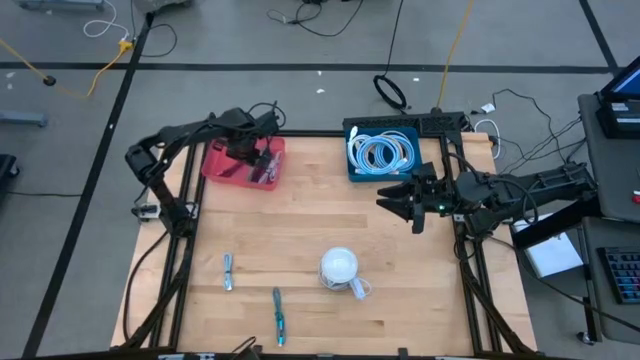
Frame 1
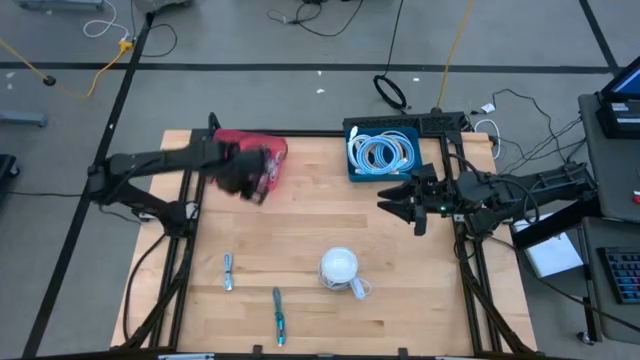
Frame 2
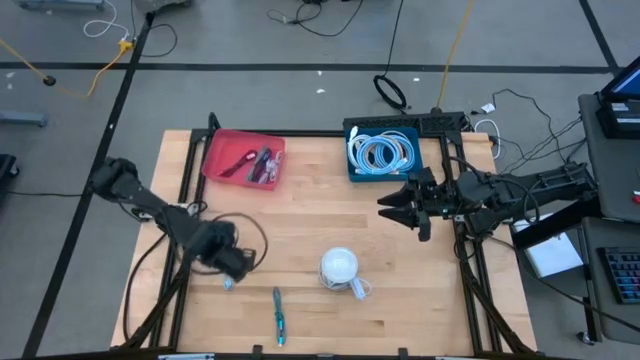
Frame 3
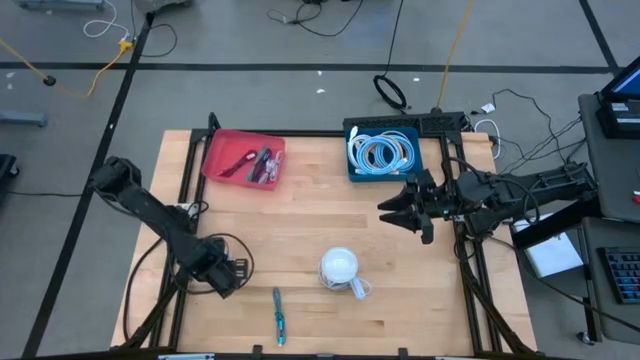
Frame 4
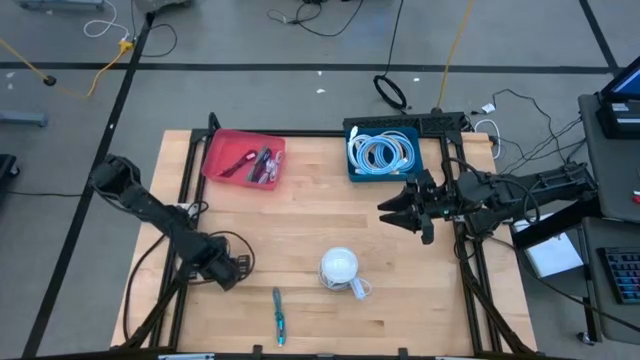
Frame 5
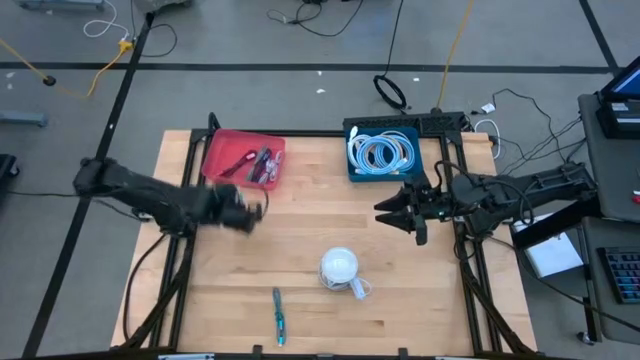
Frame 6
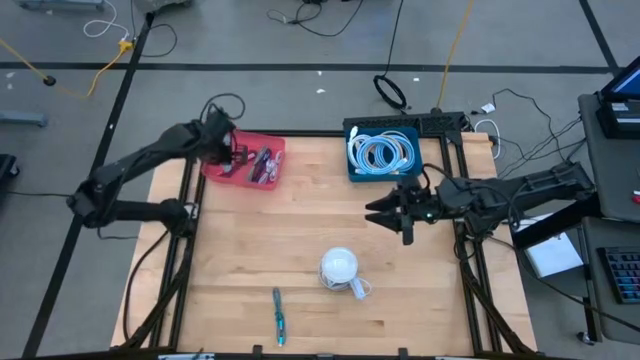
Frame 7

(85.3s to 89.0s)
Task: Pick & Place USB Port
Put the light blue USB cable into the pink bin

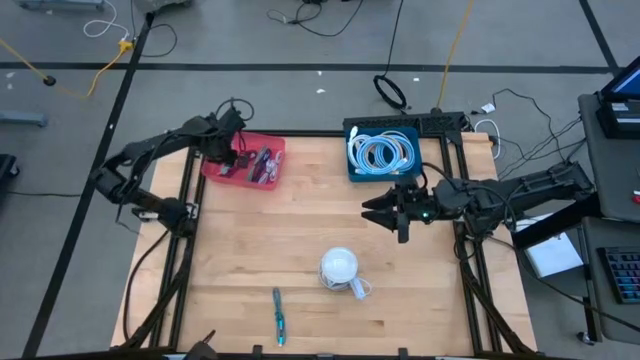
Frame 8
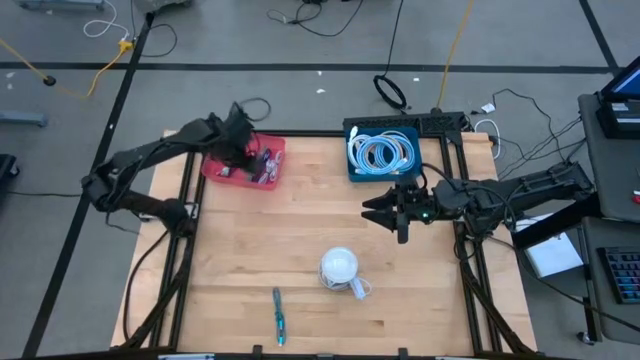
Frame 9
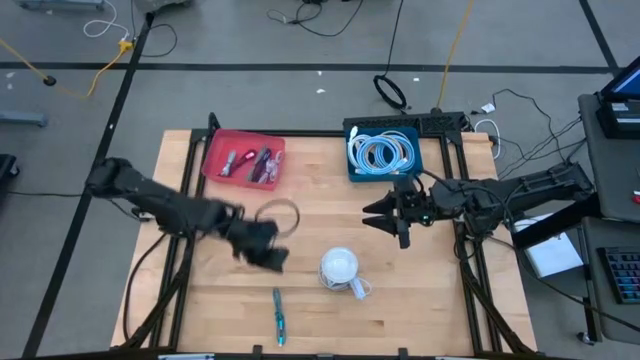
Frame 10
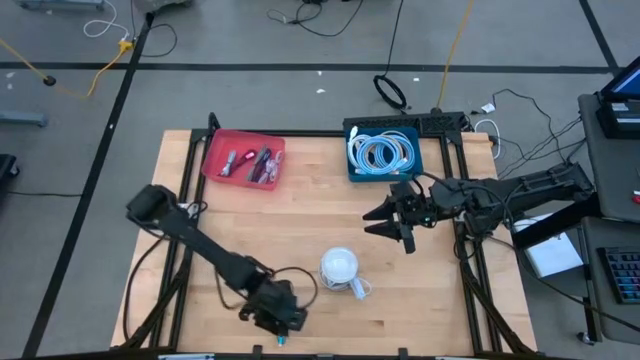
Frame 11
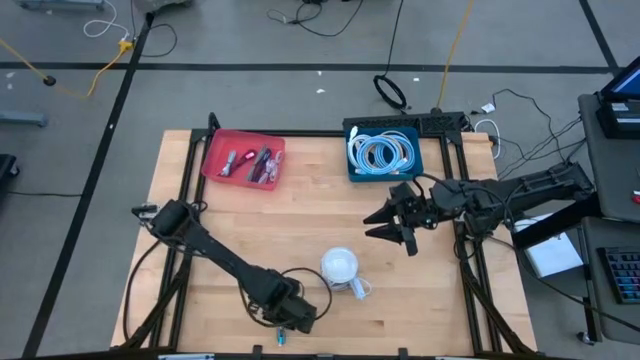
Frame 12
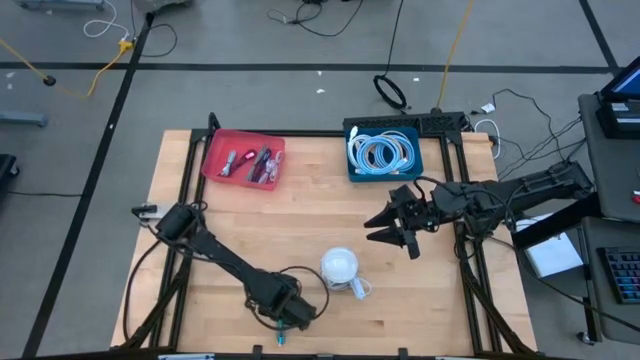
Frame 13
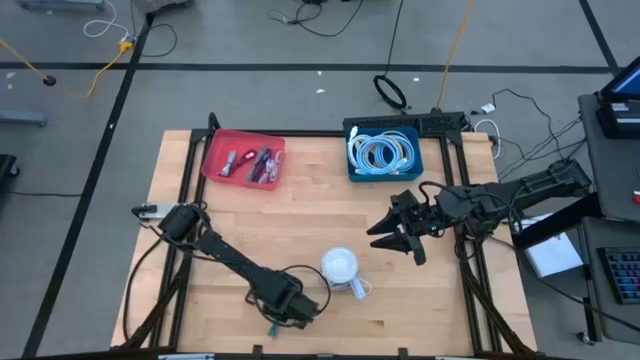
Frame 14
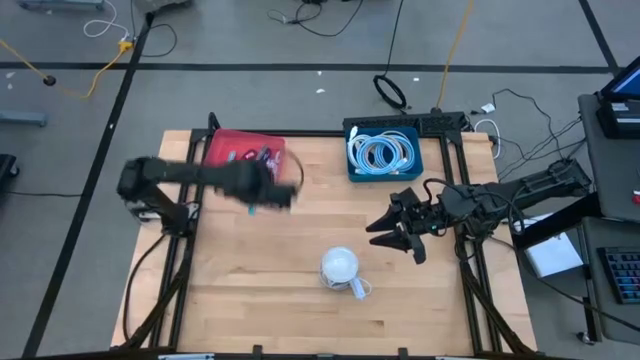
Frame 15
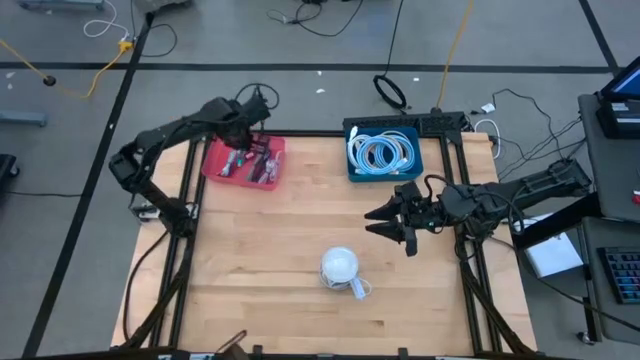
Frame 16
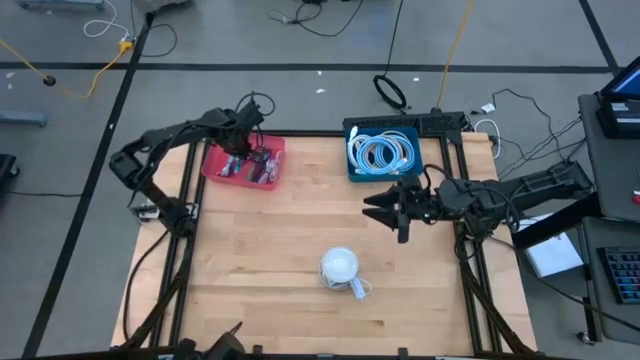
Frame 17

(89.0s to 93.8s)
Put the blue USB cable into the pink bin

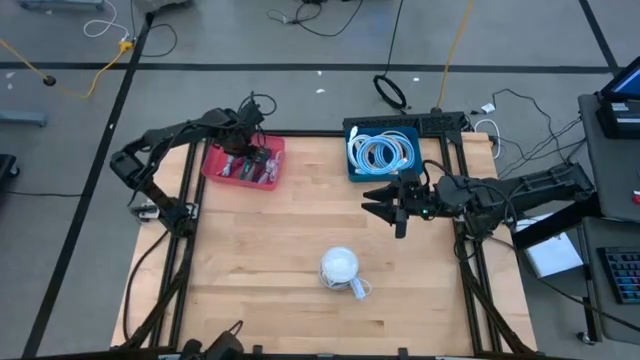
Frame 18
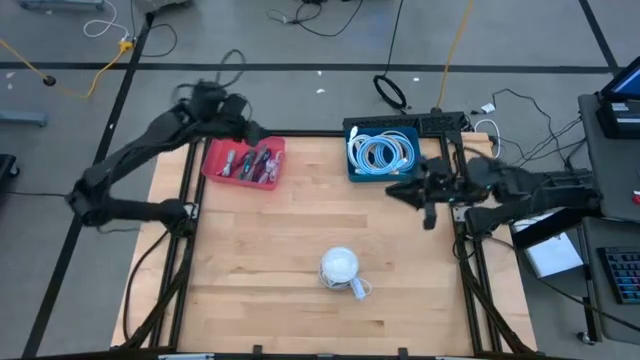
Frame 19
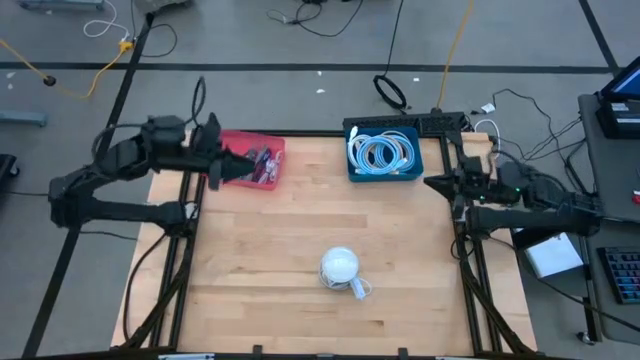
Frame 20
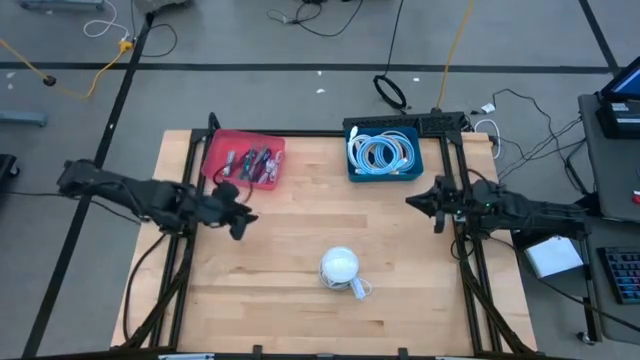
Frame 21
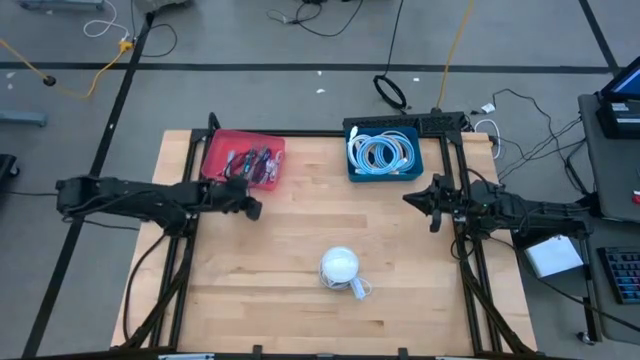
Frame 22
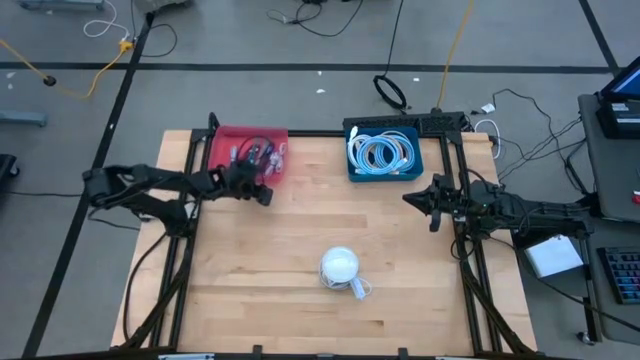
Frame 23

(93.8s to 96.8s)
Adjust the pink bin

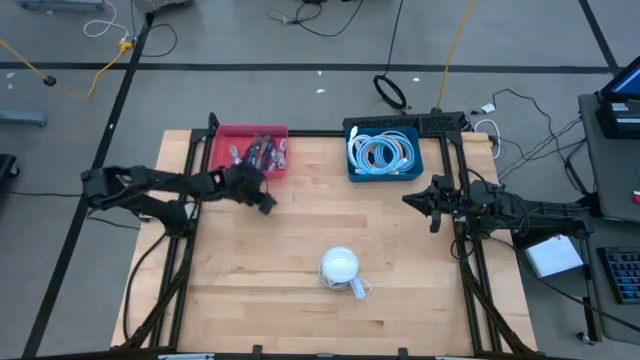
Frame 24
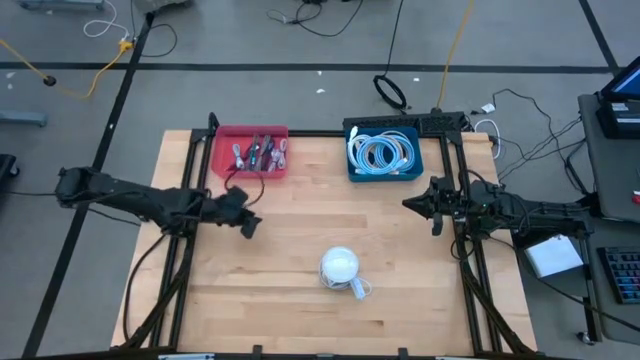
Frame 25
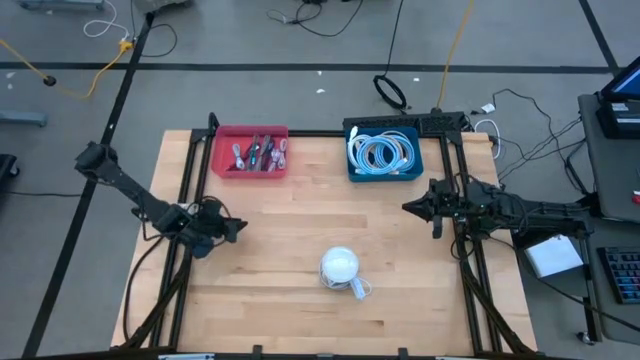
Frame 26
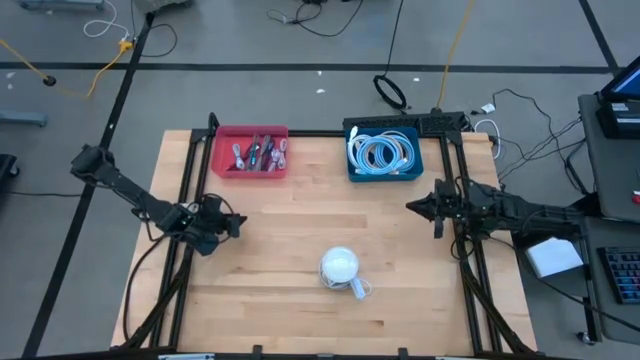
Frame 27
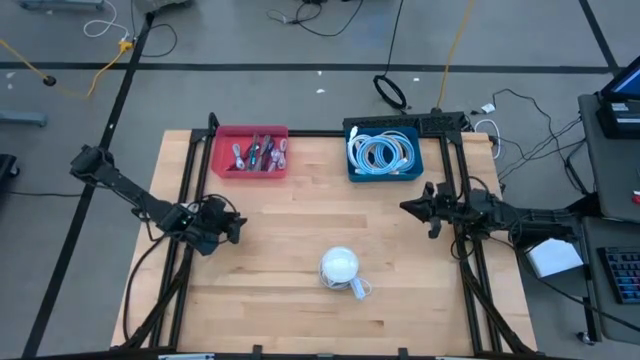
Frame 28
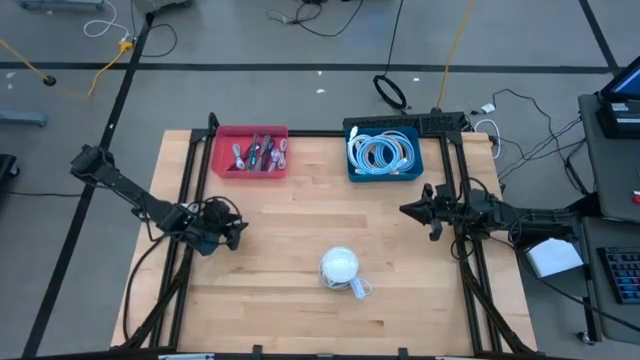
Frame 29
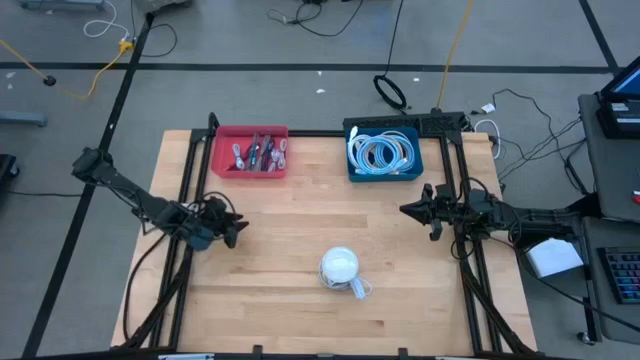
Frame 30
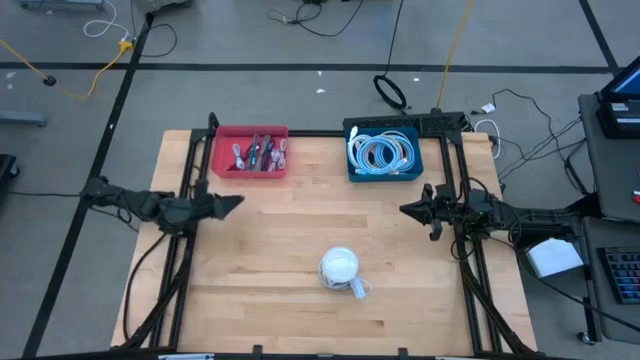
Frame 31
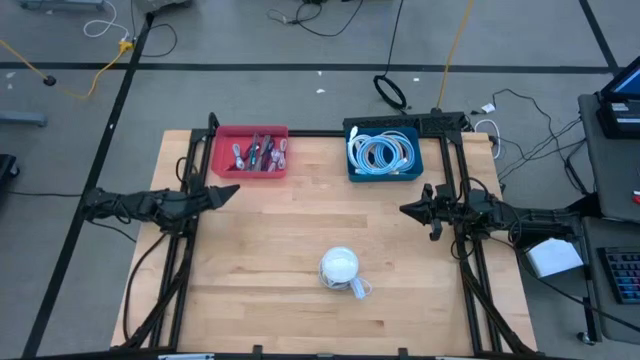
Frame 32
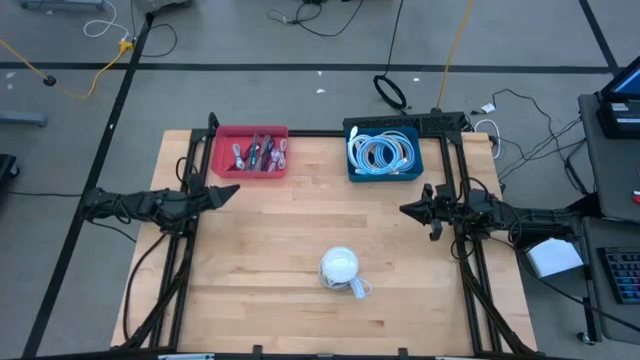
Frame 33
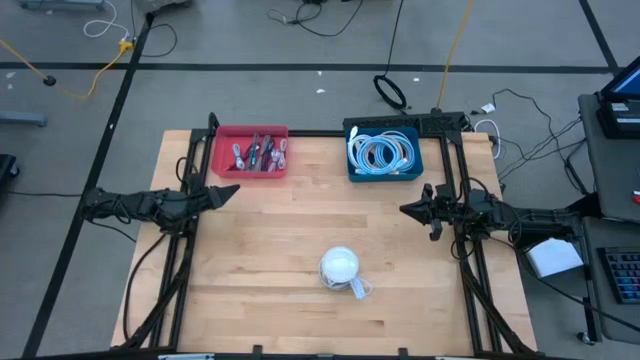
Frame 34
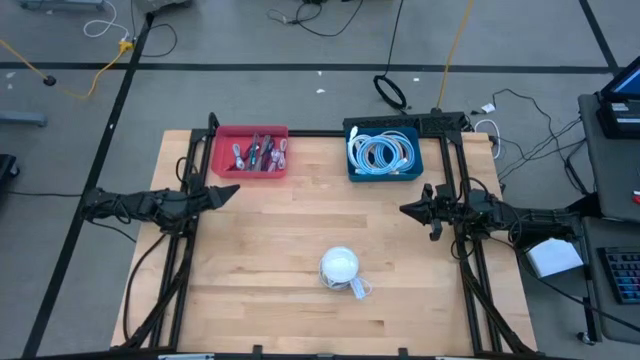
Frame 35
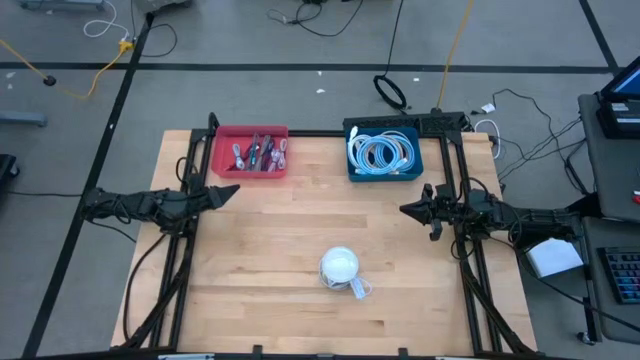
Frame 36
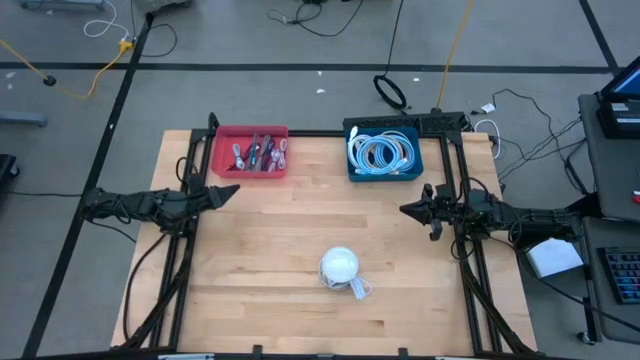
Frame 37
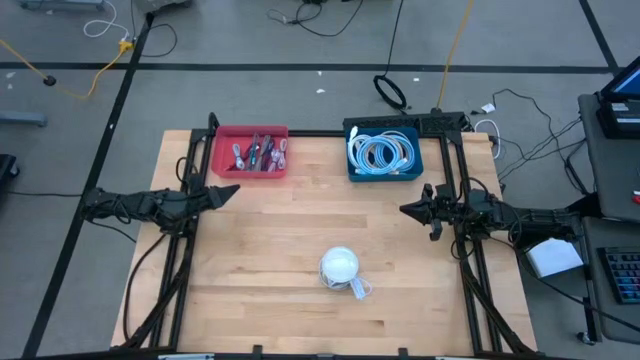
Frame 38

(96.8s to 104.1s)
Return to Home Position

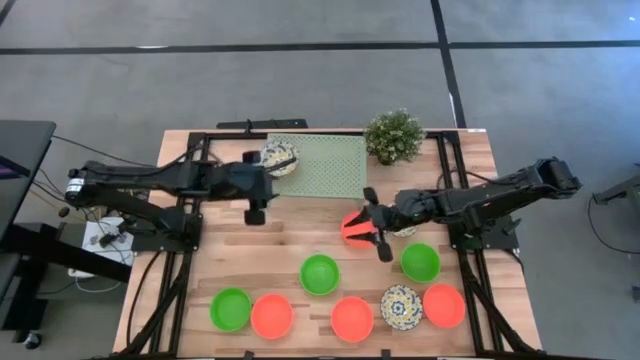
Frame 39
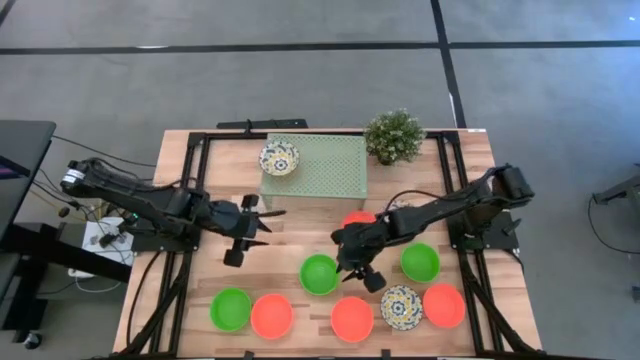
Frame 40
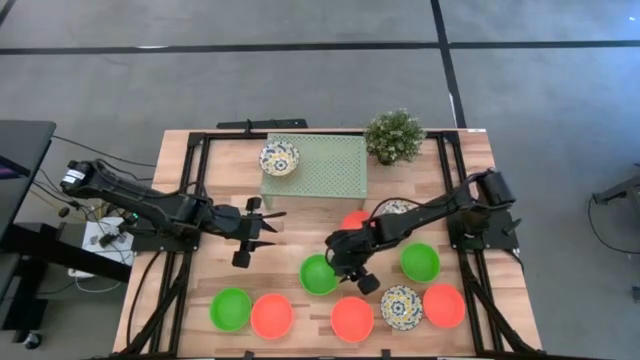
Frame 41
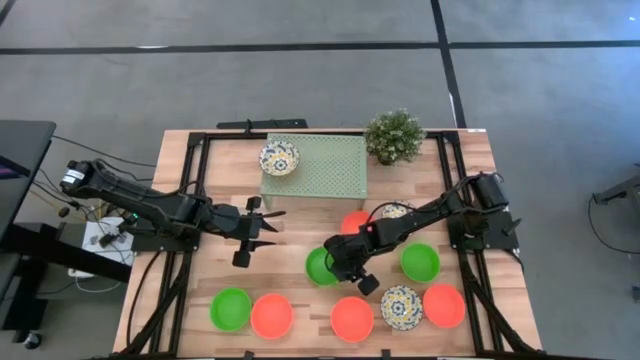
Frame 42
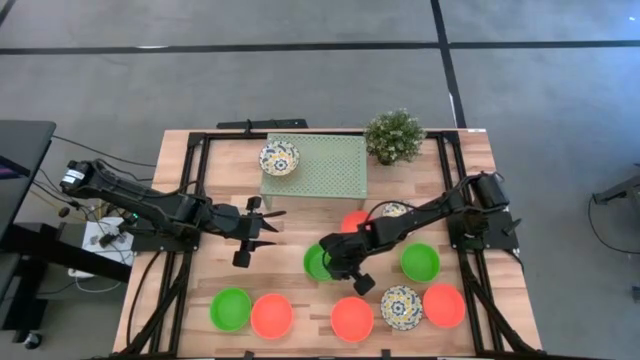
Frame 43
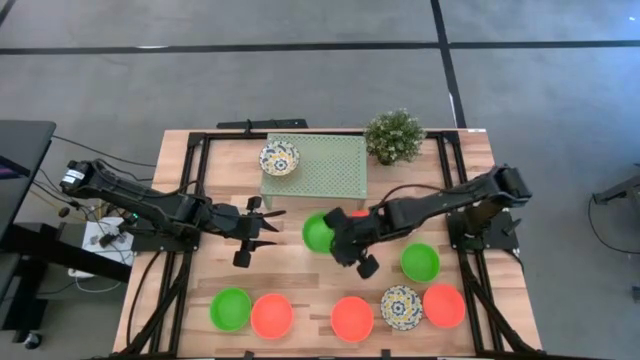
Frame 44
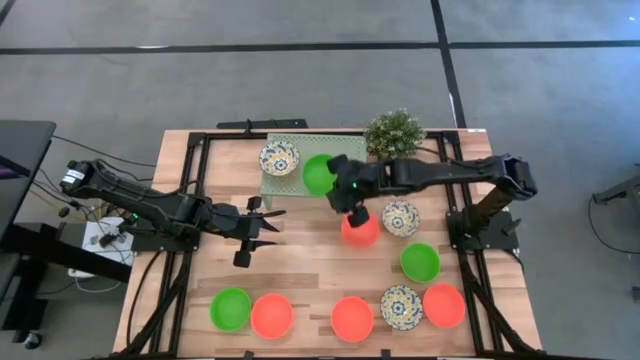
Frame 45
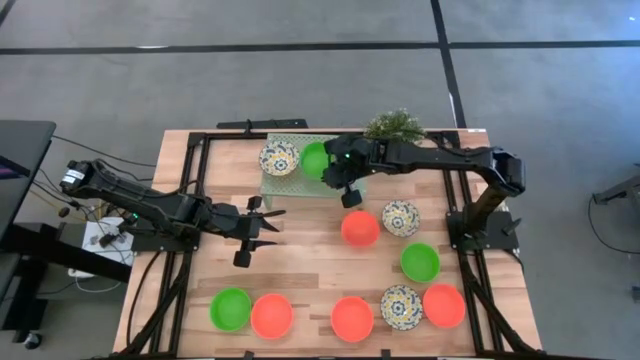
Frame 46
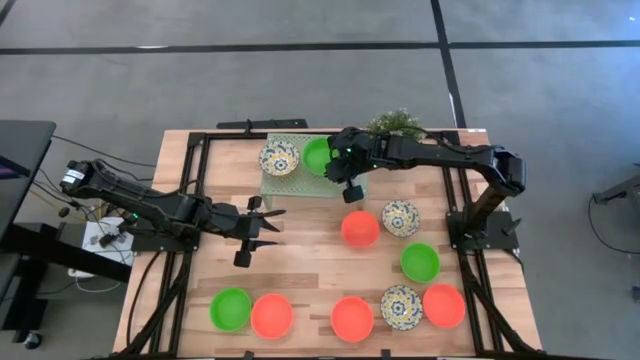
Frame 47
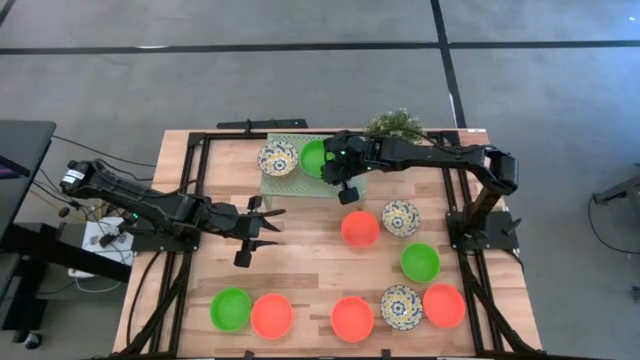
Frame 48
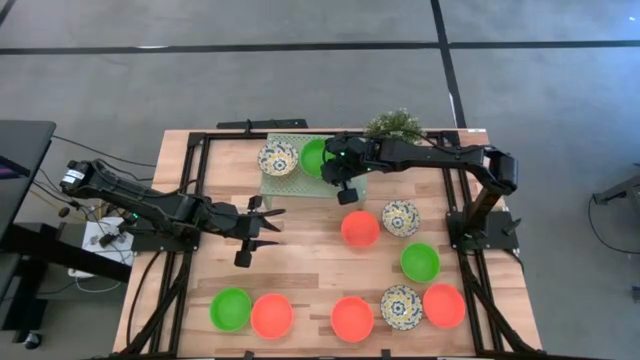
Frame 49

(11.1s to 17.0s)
Task: Pick & Place Mini bowls
Put the green bowl on the shelf
